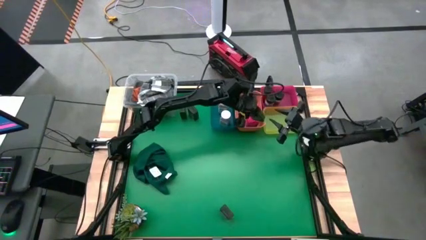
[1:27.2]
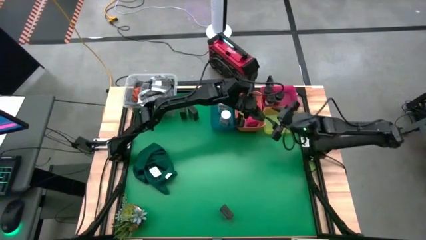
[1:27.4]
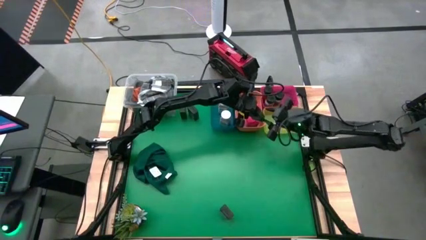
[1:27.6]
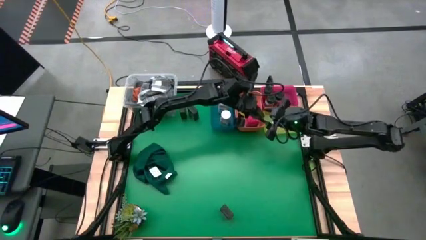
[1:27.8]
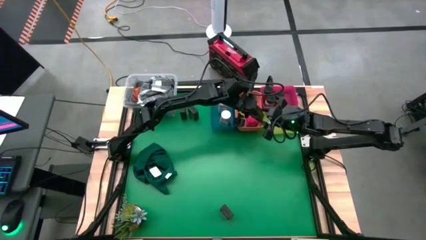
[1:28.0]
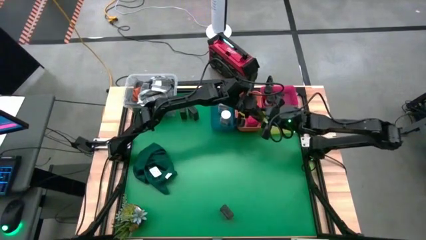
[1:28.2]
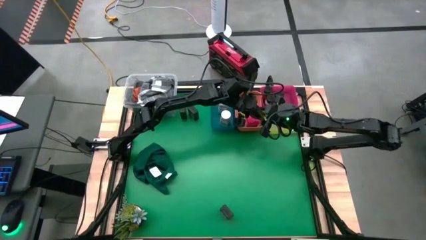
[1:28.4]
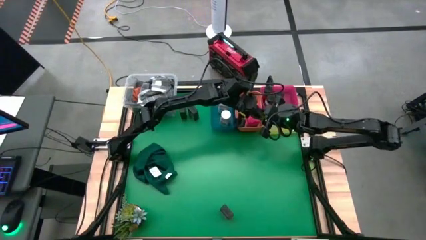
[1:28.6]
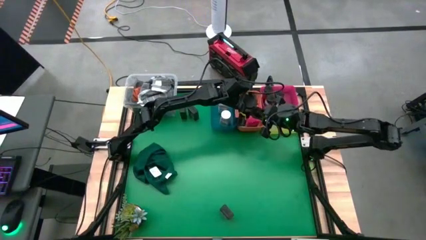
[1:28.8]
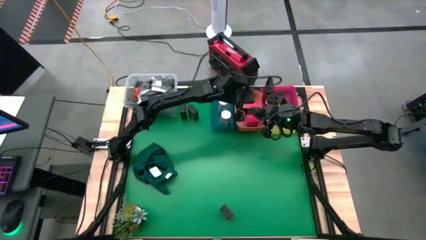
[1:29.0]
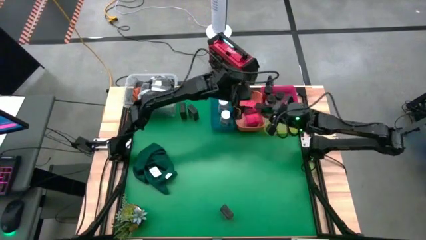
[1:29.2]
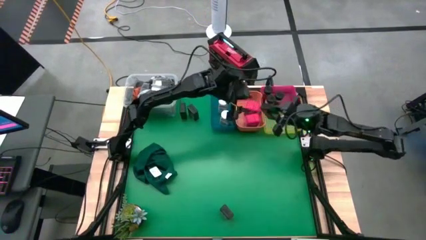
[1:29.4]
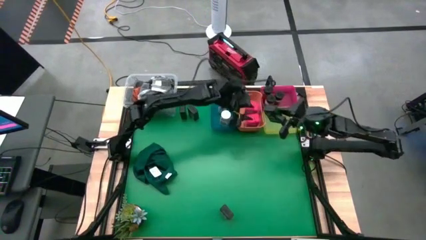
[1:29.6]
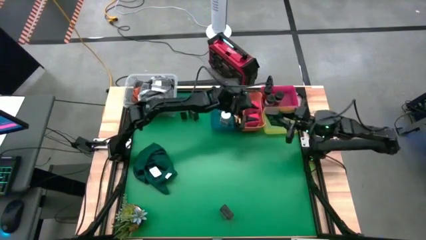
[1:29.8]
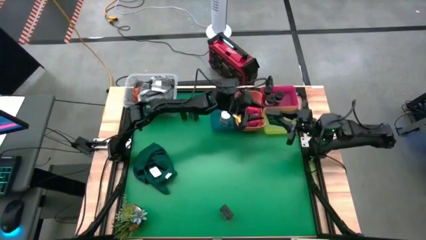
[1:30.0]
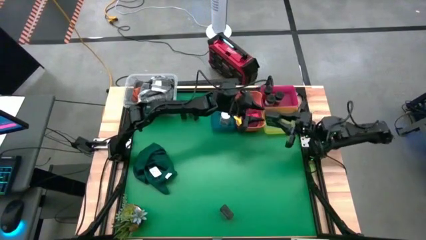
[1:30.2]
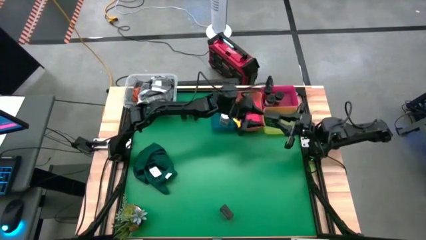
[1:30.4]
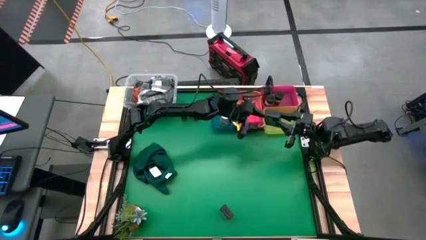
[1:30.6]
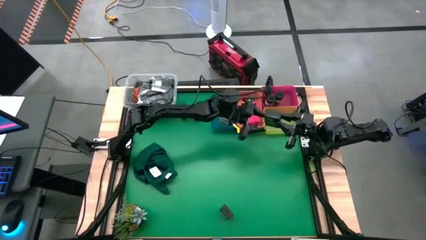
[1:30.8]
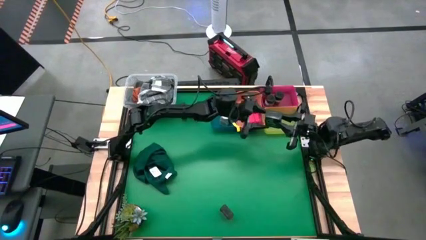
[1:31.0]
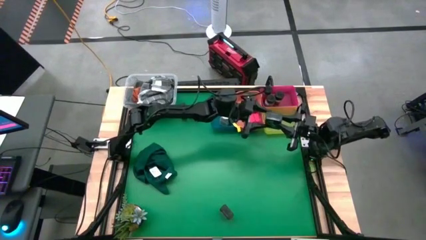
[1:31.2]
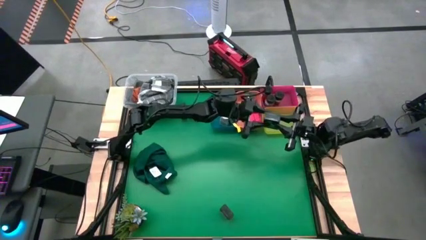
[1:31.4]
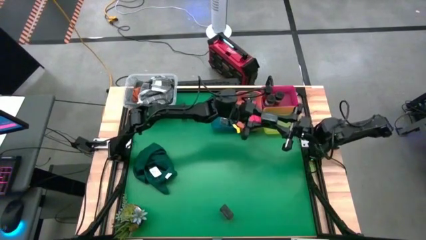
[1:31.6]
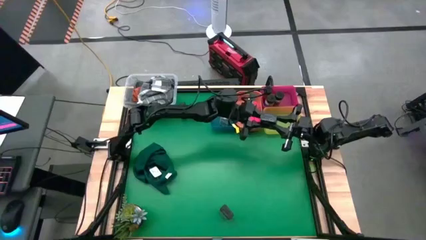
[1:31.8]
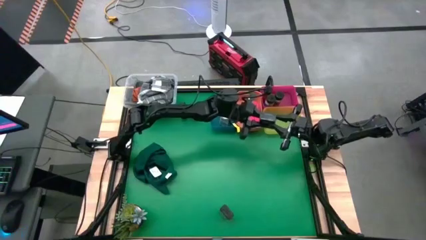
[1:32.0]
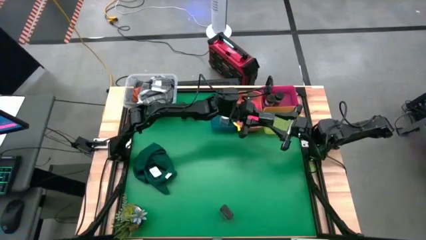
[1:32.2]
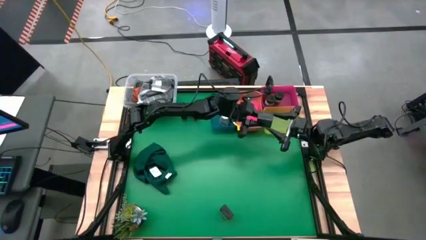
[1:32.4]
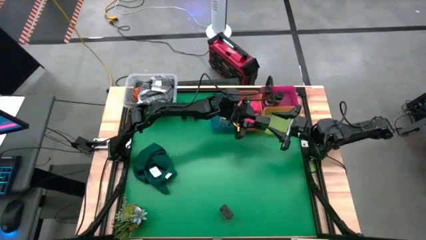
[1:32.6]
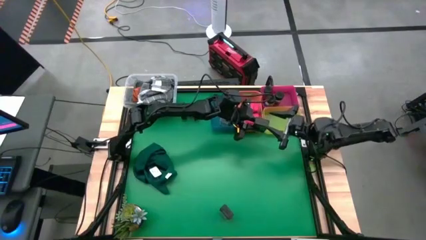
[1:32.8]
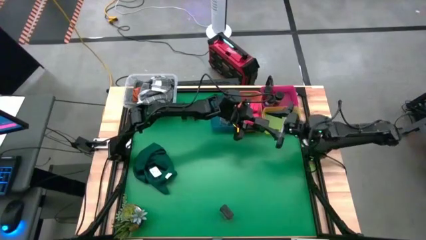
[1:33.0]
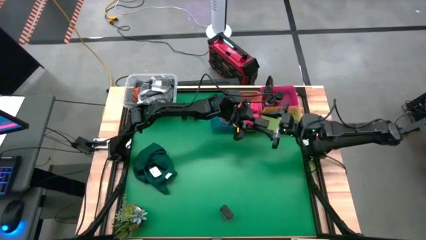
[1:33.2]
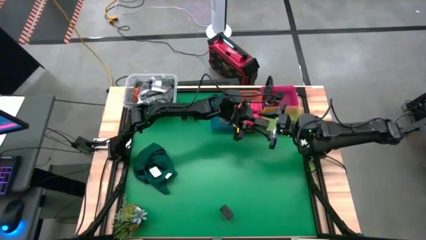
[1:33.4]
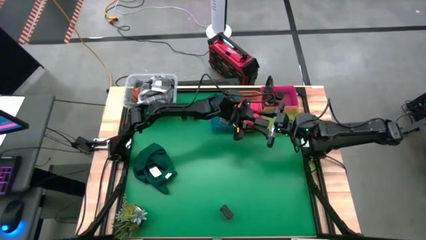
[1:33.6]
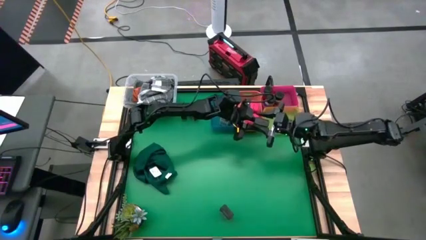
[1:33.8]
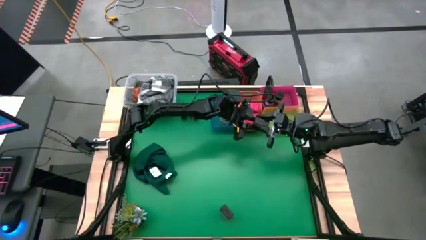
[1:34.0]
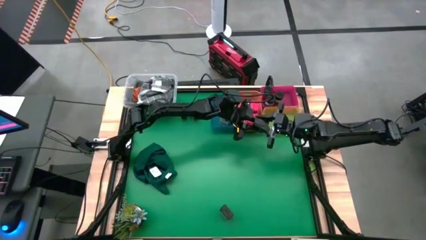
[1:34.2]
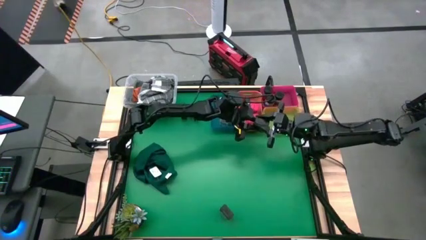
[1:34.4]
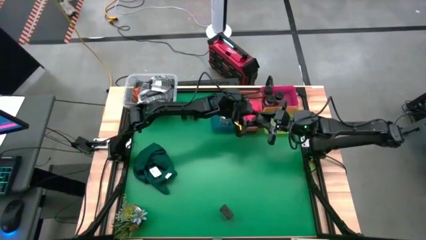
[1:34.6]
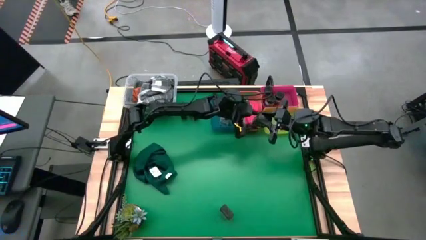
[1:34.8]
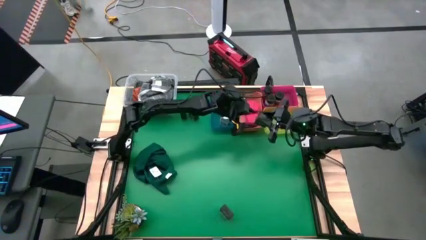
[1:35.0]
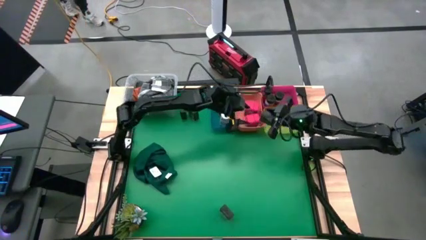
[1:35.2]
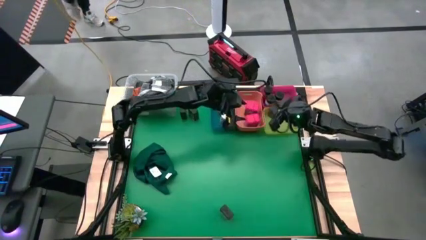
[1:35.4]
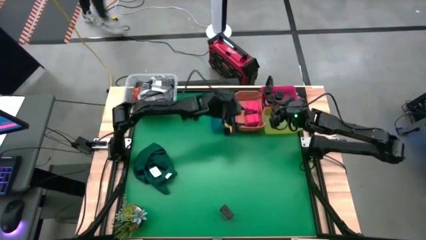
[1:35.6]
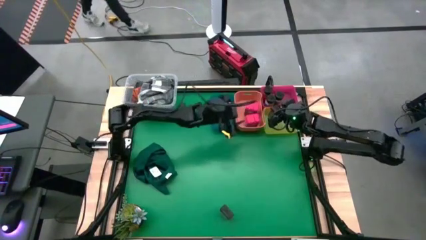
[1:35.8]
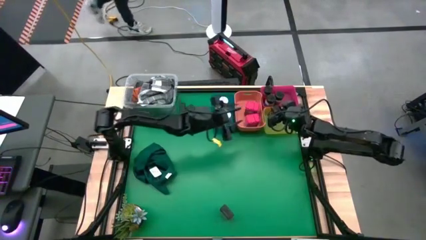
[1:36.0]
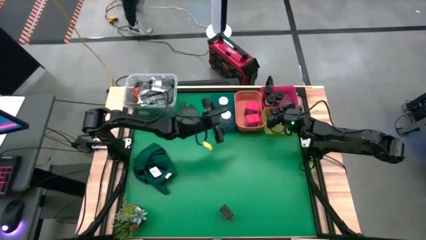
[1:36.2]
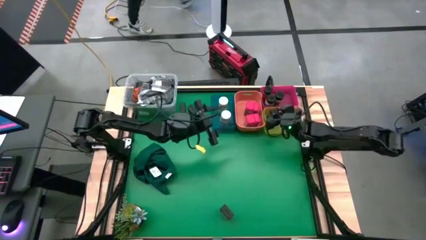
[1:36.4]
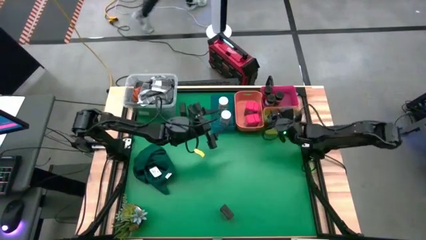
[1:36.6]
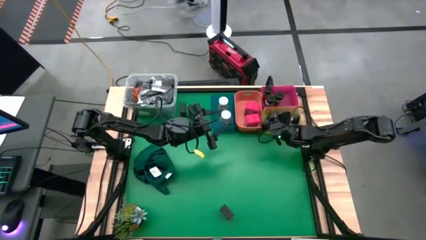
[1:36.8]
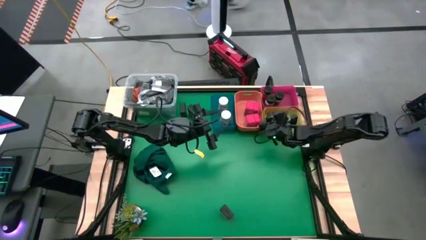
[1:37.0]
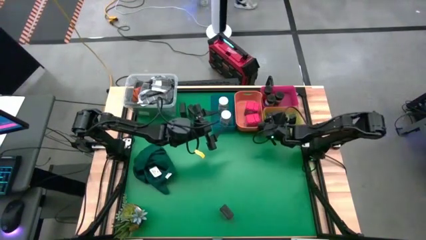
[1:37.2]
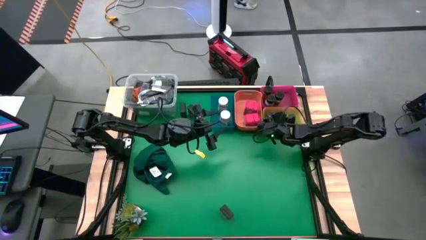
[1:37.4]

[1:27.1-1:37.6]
Task: Sort spices by type
Put the black seasoning can into the yellow bin

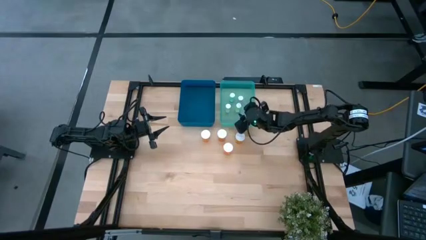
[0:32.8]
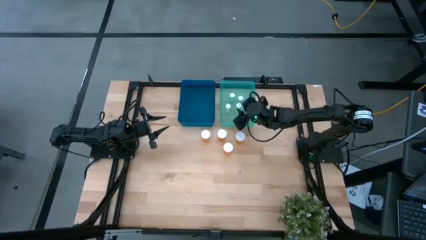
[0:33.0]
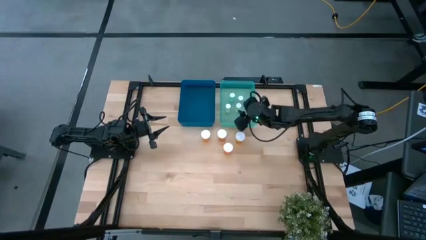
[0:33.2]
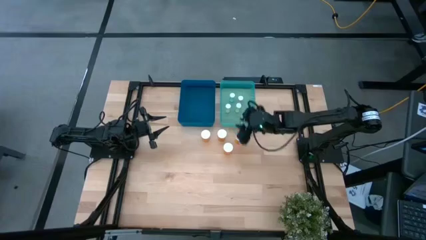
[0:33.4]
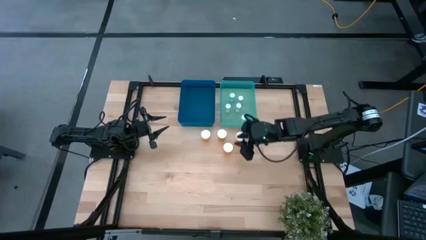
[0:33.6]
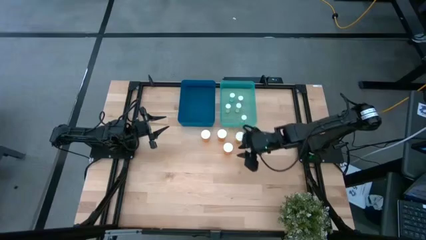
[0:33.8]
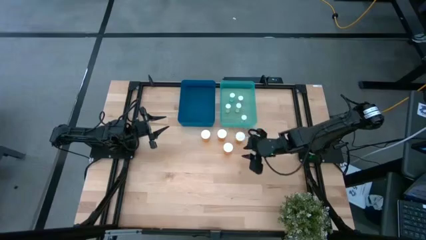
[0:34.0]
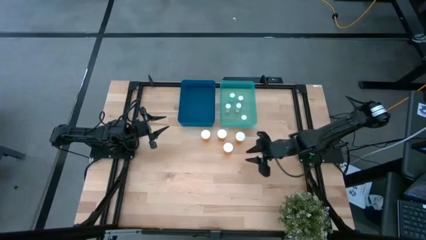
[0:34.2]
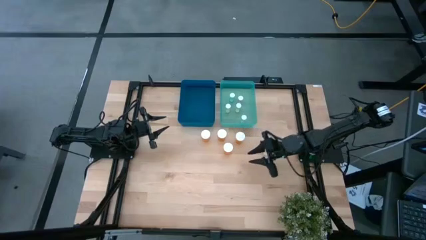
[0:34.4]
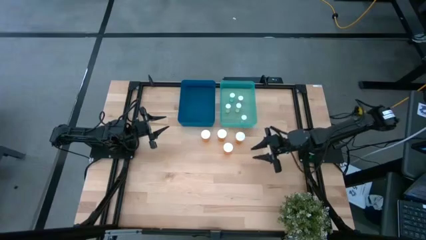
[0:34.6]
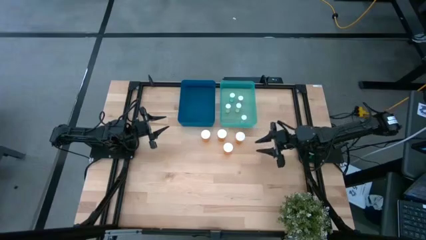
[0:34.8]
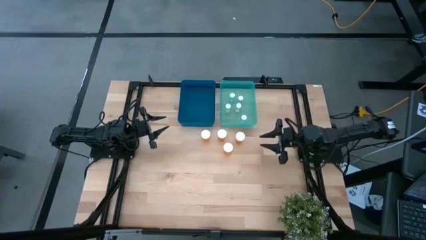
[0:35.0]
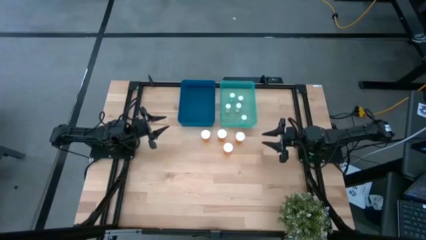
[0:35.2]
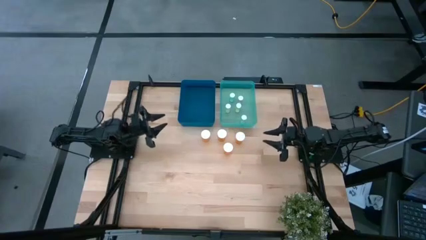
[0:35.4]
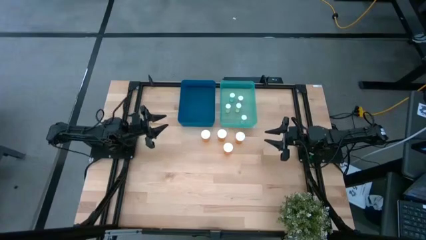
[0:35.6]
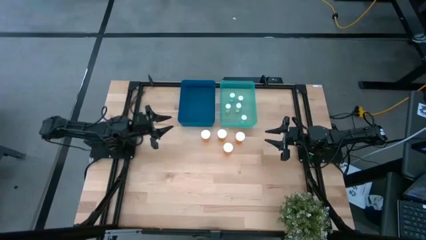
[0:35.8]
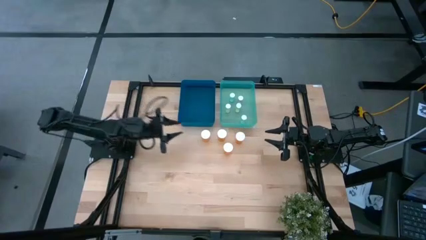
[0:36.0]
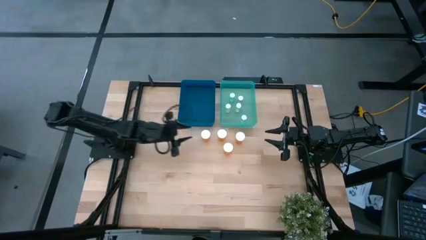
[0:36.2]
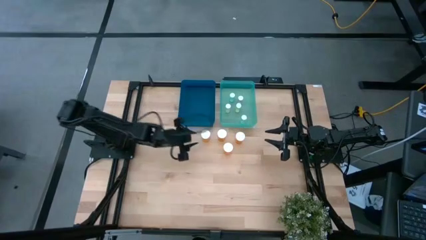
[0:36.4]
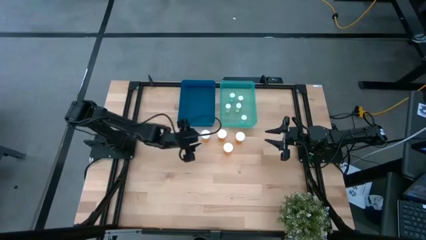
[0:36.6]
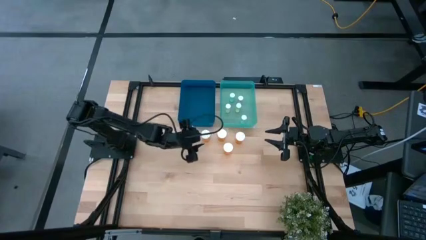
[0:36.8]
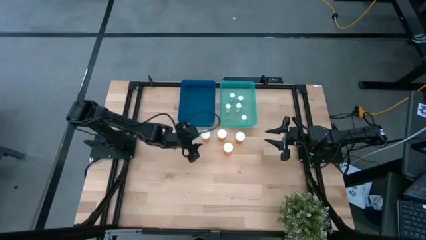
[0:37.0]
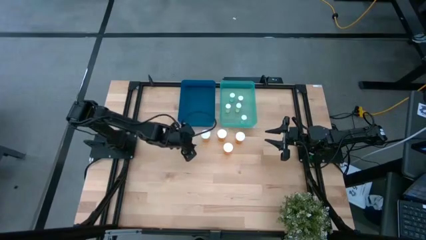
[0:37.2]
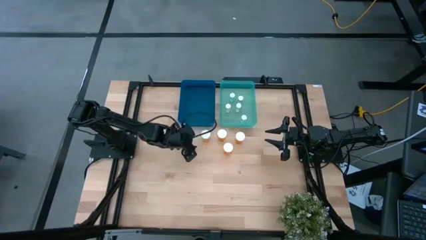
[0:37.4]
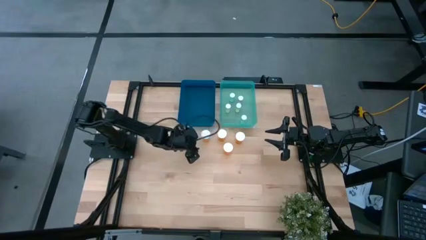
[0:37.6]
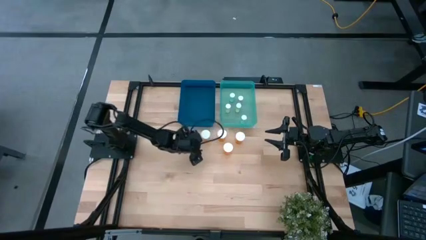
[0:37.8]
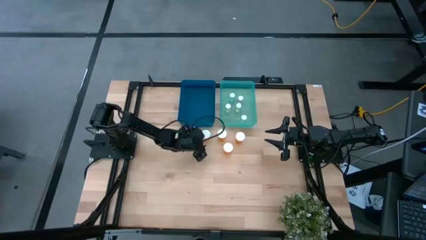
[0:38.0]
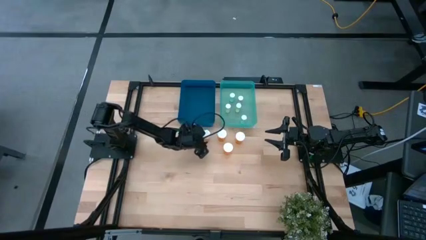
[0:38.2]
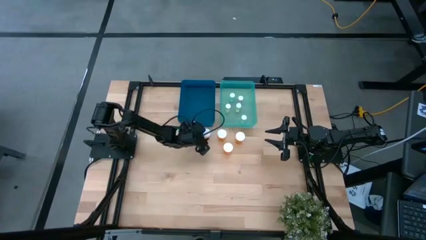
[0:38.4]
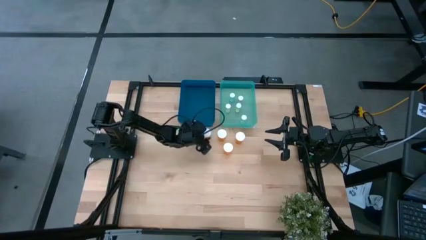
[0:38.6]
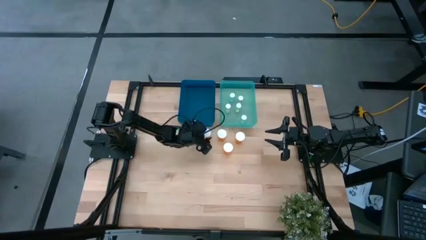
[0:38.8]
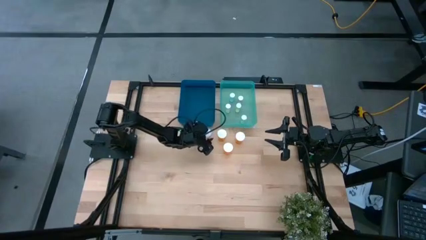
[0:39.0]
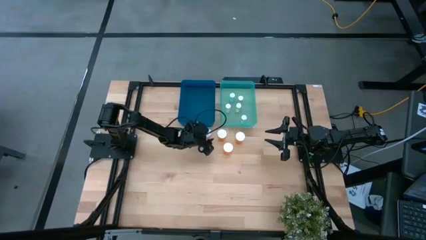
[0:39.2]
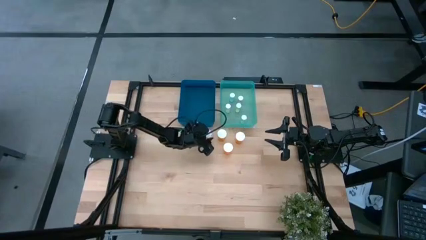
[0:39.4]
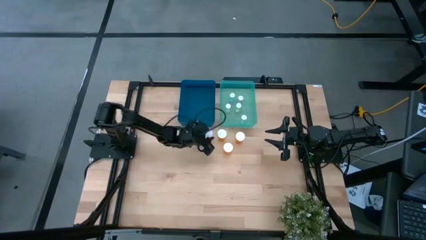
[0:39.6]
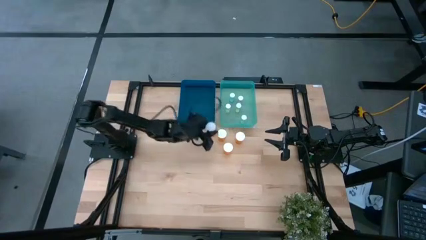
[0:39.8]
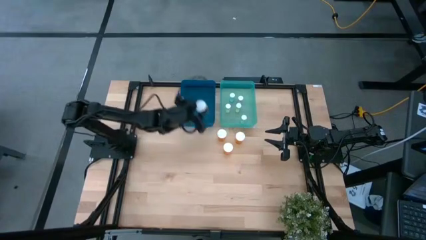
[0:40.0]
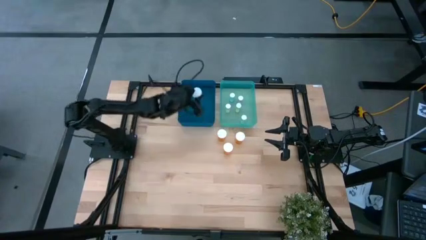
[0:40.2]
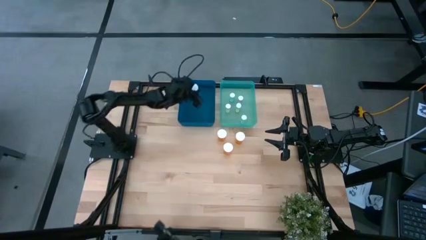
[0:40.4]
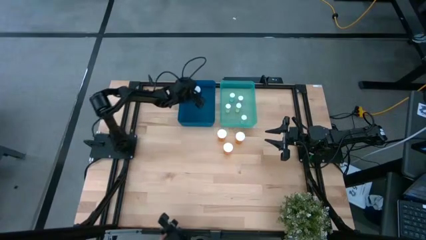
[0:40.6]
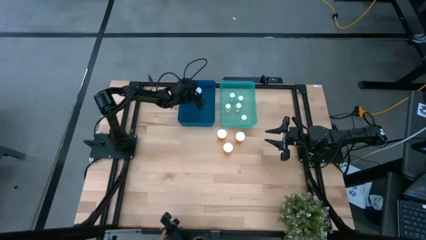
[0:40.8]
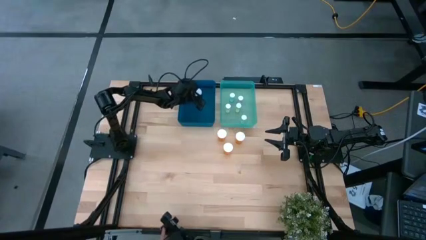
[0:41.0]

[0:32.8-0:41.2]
Task: Pick and place medicine bottles into bin by pill shape (circle, oval)
Put the orange capsule bottle into the blue bin
